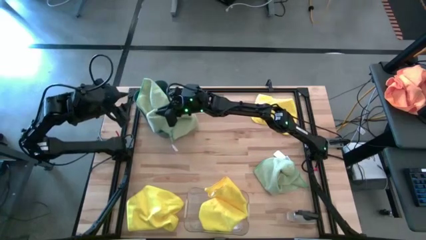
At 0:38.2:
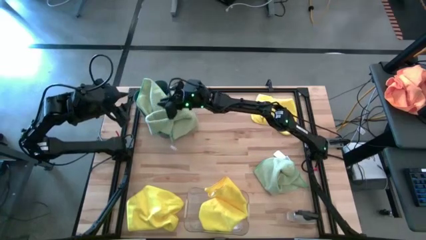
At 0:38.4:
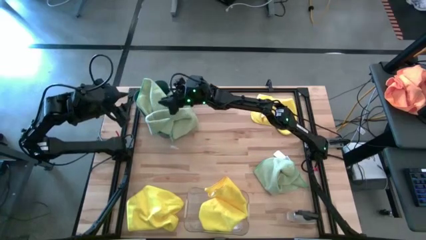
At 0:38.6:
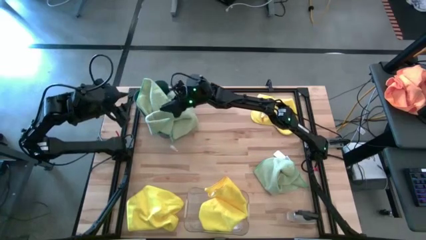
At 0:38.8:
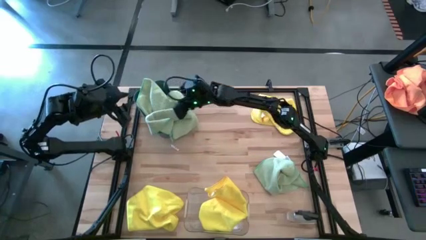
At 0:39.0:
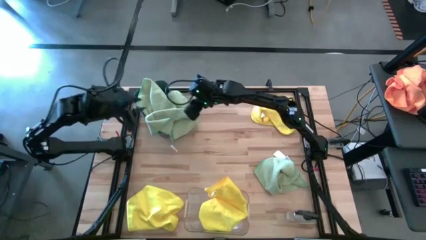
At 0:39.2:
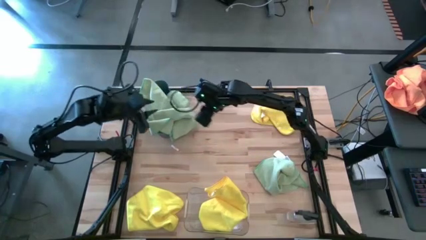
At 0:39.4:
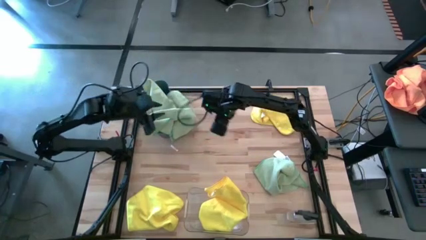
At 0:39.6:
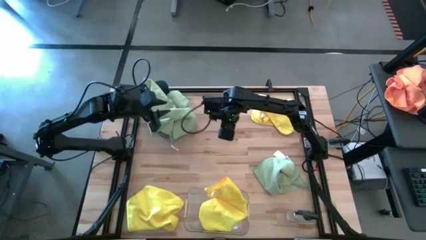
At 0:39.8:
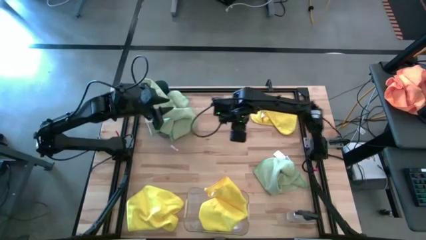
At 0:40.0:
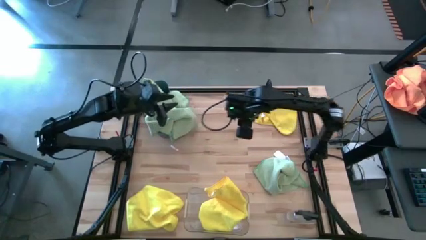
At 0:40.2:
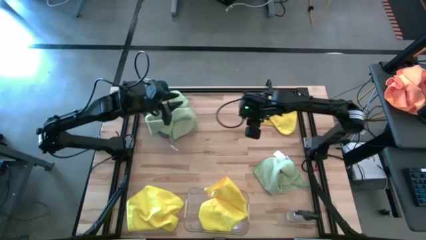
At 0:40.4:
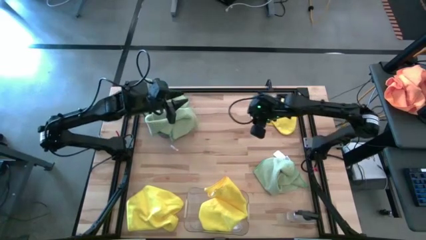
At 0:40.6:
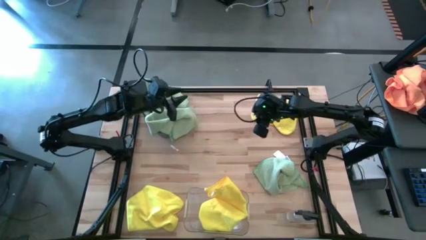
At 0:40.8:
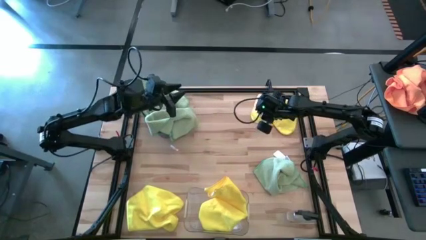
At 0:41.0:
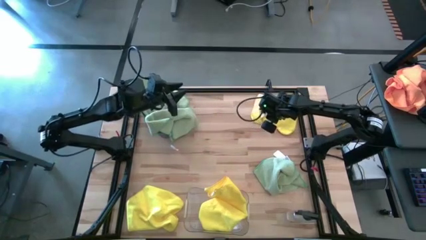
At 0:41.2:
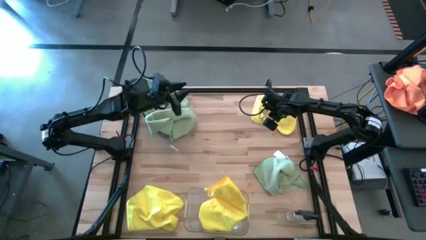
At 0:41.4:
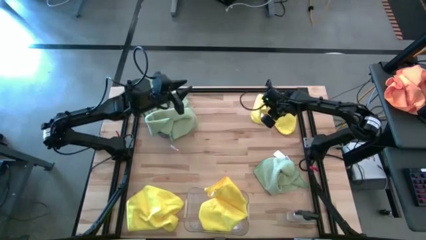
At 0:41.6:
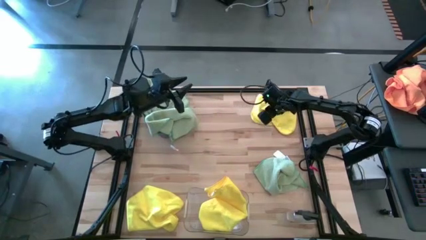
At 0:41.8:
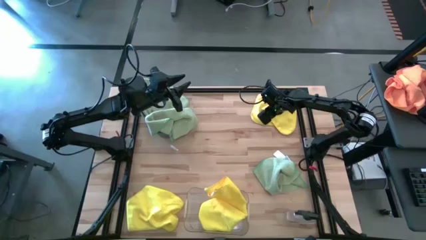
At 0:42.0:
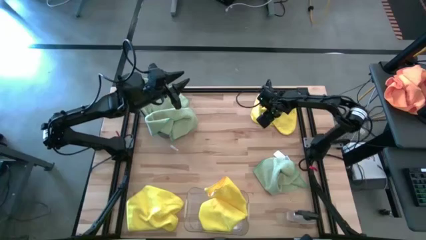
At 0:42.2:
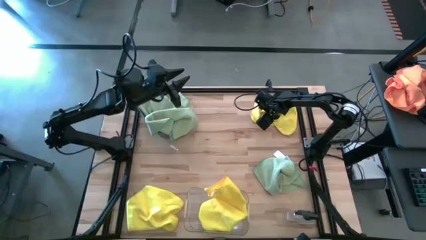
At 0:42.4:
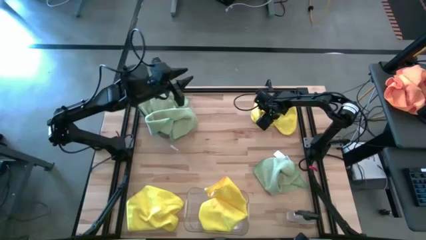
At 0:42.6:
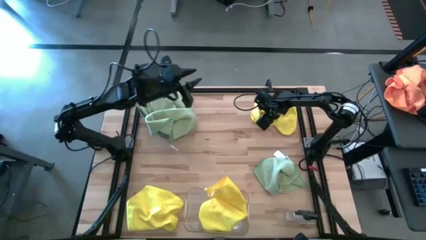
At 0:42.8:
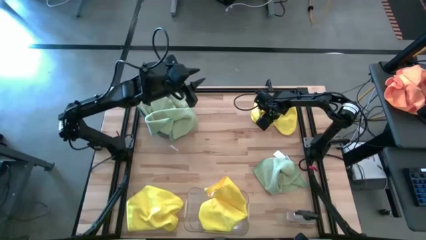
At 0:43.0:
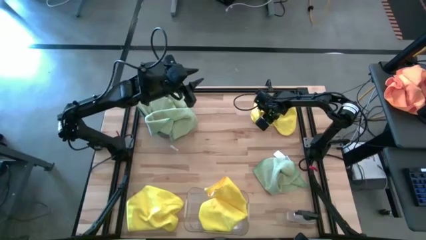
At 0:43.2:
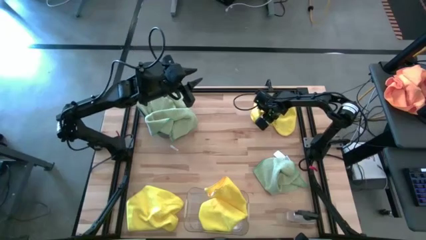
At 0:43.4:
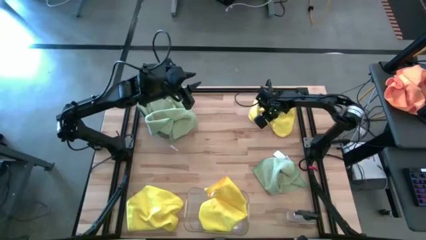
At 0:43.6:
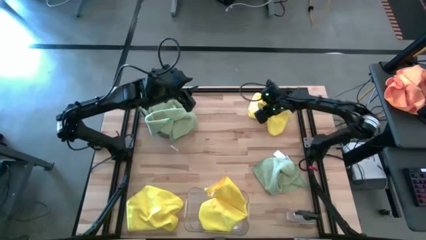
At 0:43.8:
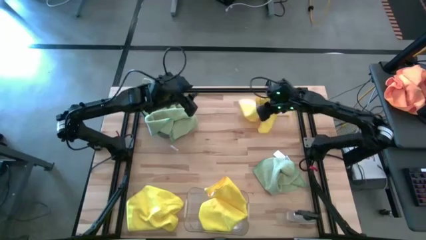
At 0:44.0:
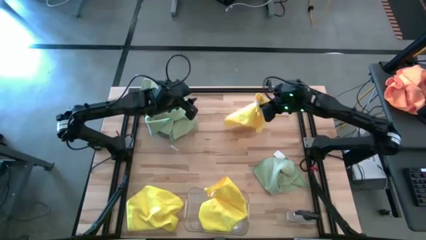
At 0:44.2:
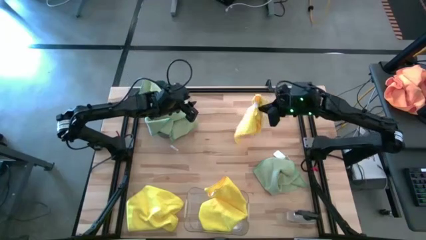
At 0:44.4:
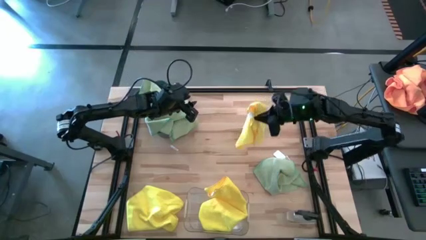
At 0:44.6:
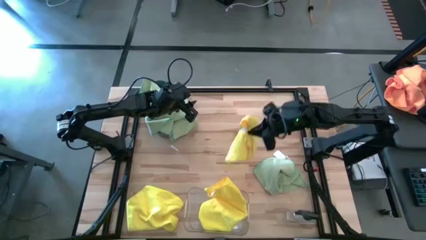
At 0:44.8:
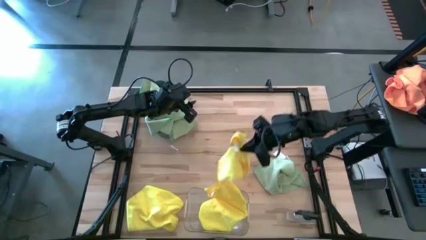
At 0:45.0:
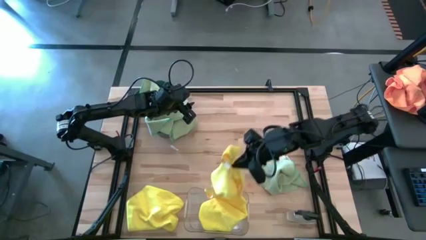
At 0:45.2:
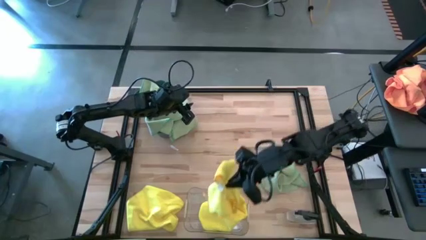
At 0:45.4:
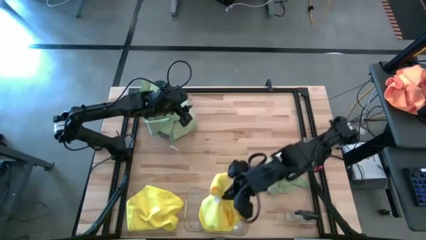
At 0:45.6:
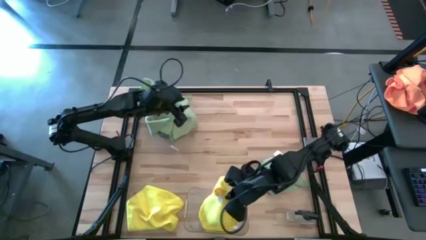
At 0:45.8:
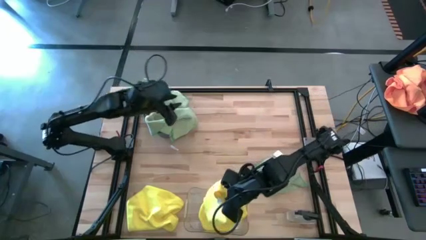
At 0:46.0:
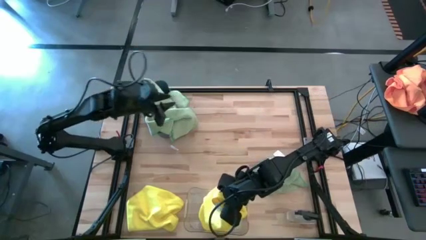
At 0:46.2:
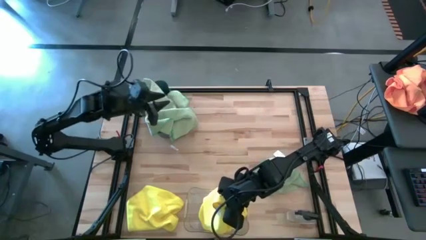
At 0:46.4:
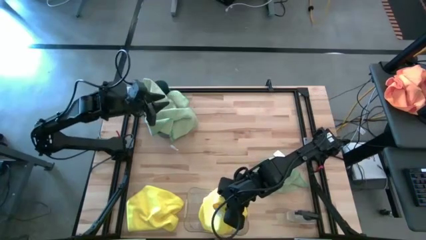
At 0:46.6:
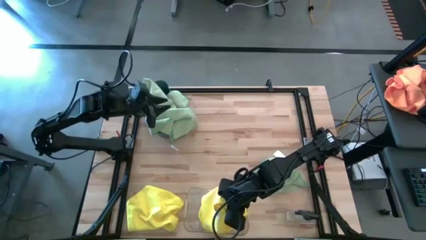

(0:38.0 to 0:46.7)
Task: Sort microfiber towel by color & place in baskets
Put the right yellow towel into the transparent bin

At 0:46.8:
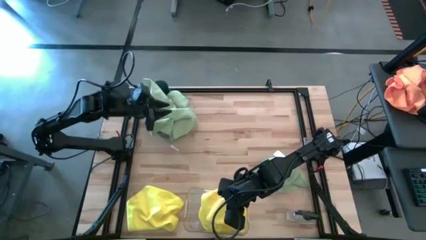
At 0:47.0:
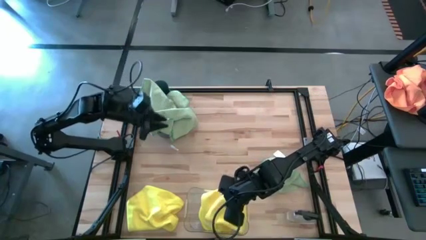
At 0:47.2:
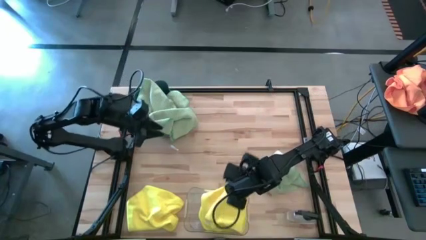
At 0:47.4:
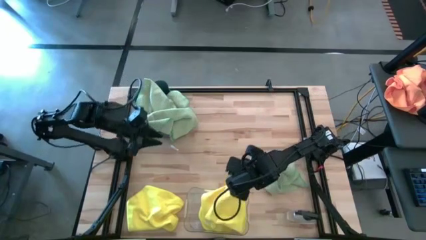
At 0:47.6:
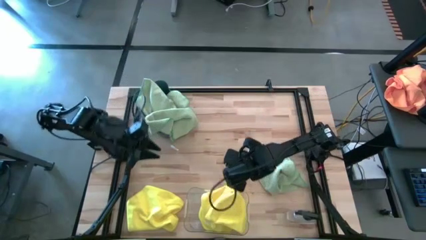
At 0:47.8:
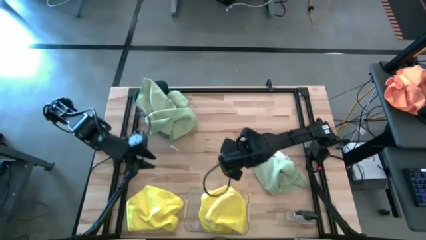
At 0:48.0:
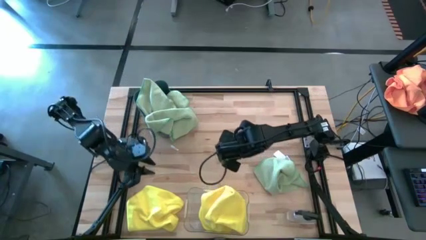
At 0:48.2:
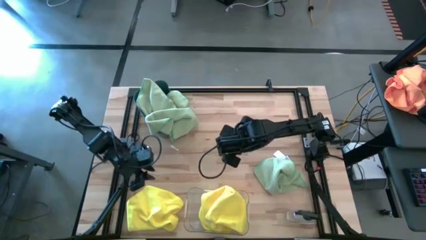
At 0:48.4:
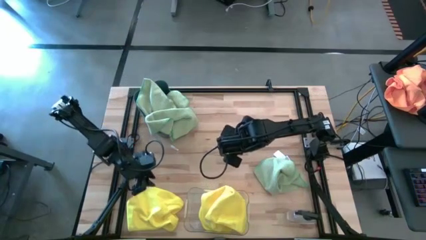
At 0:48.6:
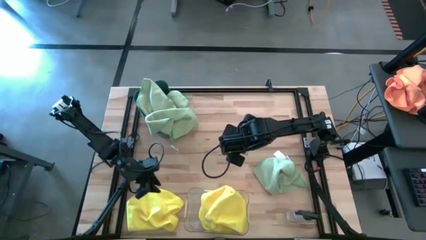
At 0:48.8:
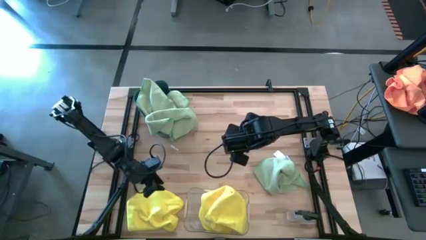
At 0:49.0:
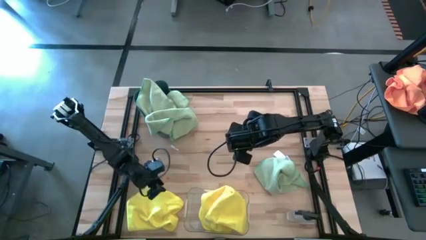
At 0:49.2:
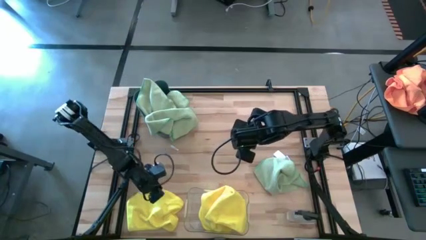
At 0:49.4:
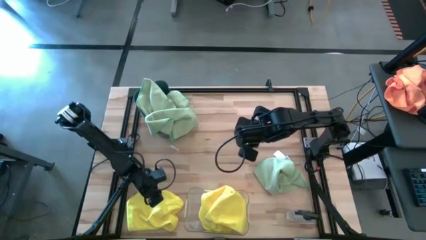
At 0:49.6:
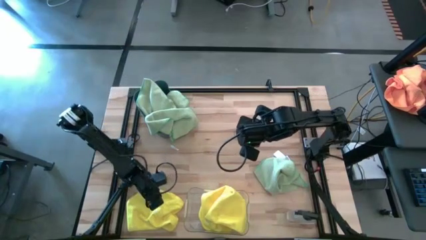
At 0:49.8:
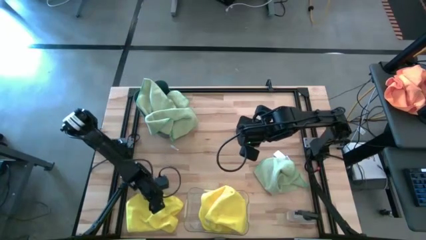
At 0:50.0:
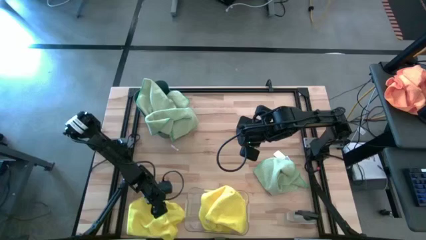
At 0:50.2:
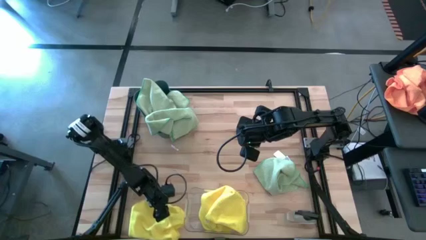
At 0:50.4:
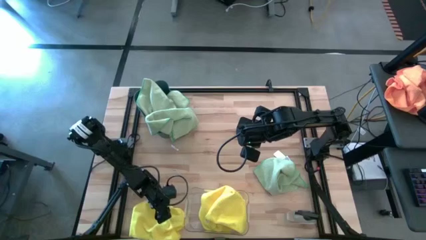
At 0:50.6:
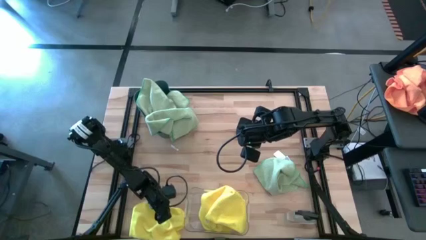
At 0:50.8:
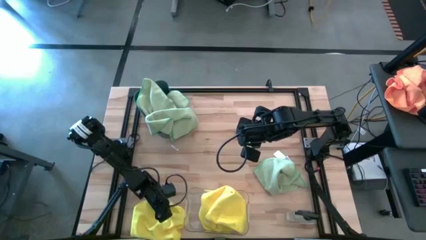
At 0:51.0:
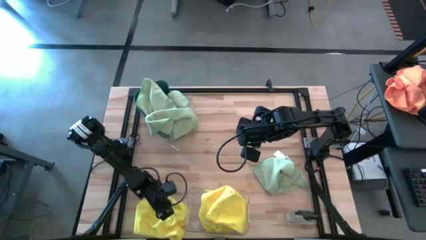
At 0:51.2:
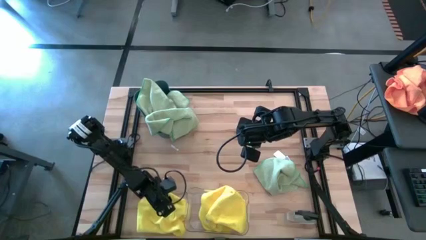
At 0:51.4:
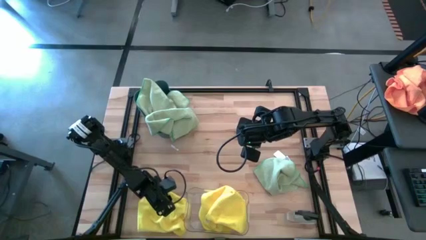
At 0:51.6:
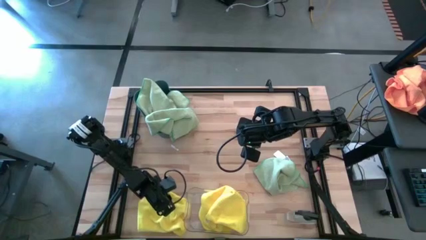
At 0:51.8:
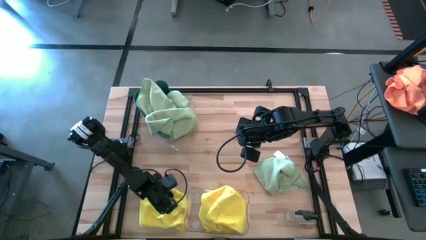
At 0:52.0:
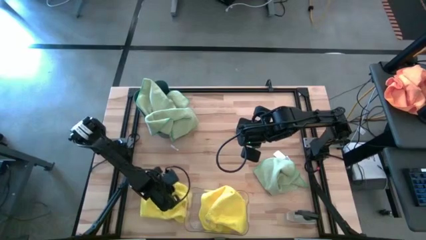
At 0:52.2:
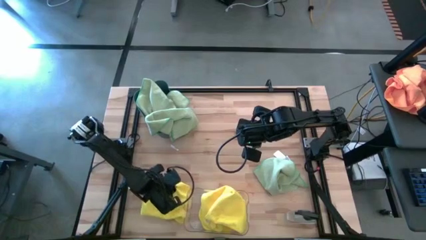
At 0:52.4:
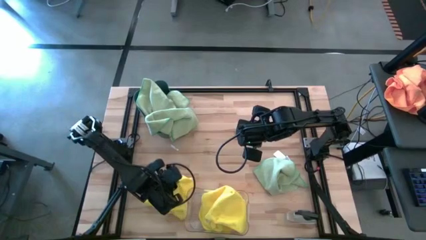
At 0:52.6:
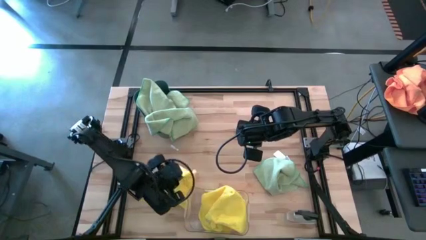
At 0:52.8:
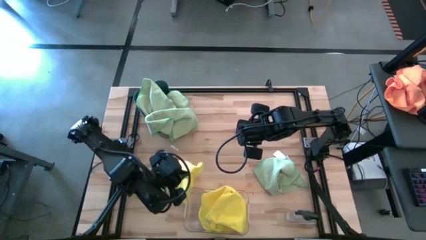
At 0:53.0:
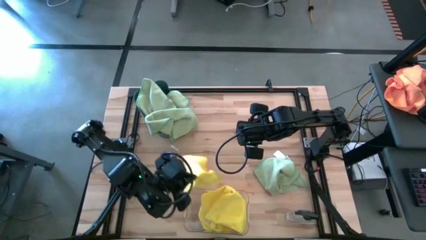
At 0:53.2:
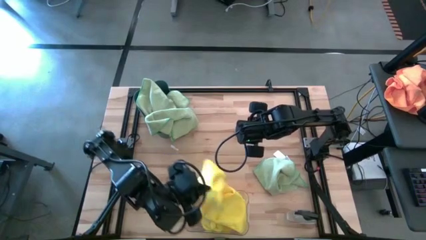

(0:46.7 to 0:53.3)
Put the yellow towel into the transparent bin

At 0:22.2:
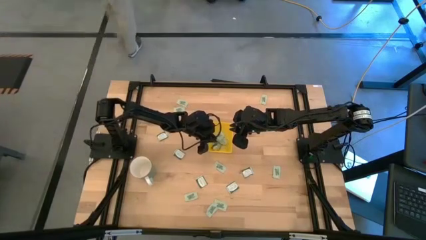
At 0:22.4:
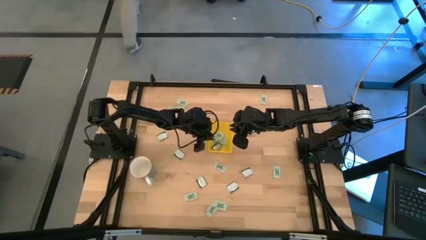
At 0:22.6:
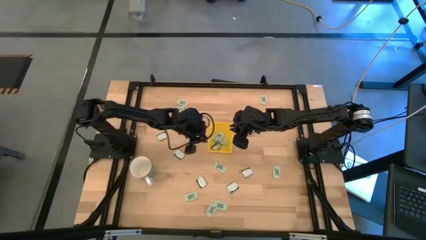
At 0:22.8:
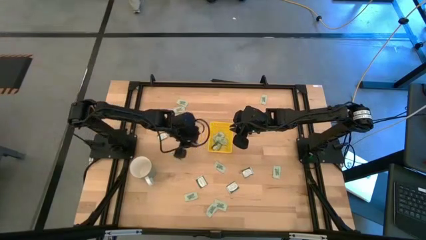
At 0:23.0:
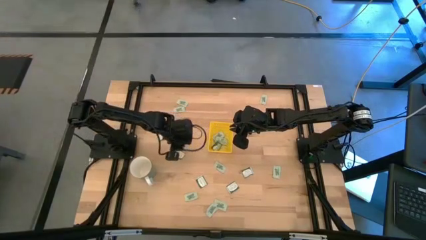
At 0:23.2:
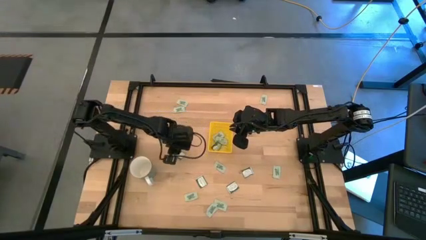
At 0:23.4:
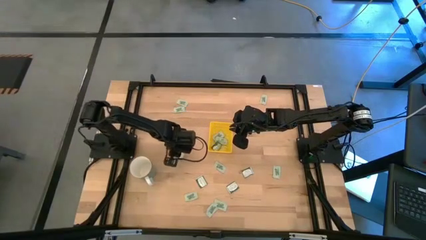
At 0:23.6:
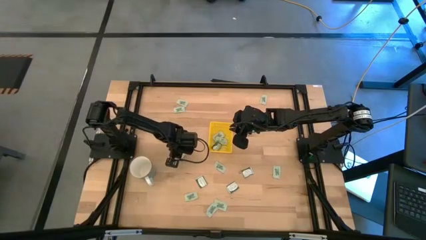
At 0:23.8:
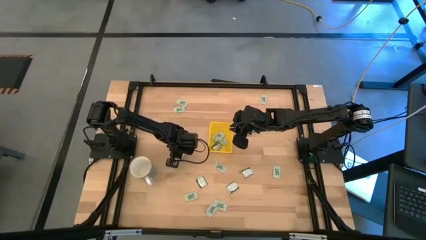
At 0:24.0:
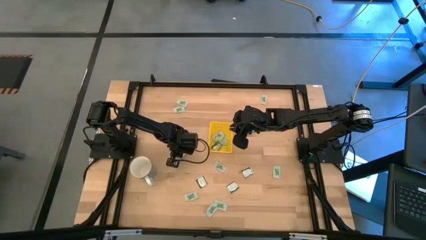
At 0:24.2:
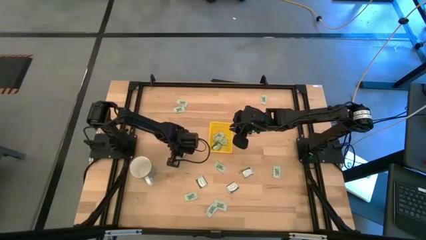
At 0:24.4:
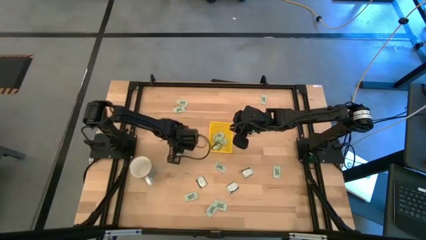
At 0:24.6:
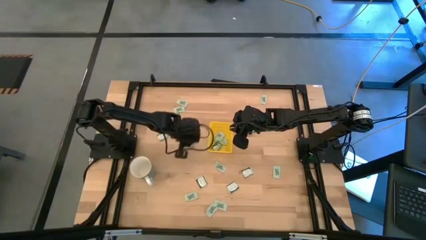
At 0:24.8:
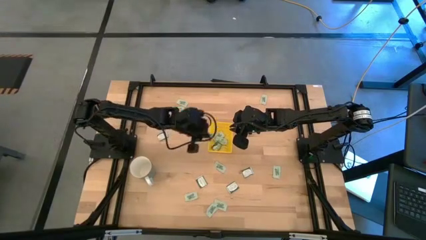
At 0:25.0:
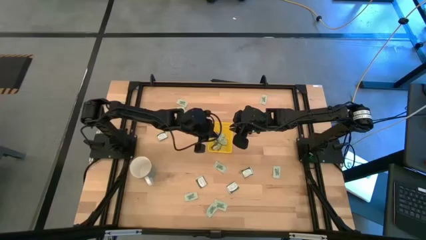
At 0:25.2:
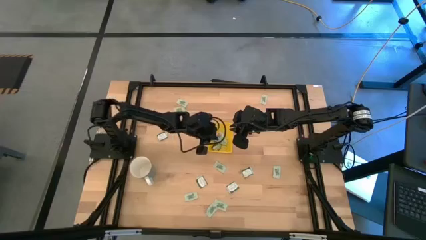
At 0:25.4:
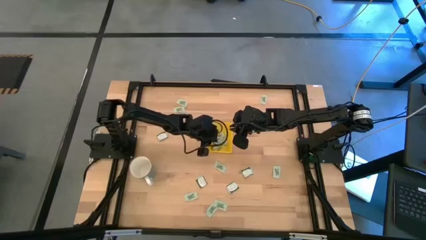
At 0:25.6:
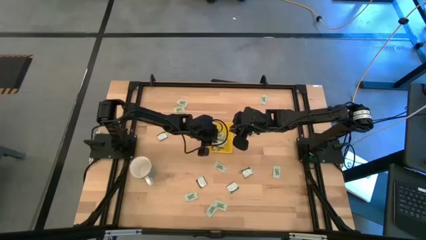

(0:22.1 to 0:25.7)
Task: Pick and place Stevia / Truvia into bins
Put the green stevia packet into the yellow bin
